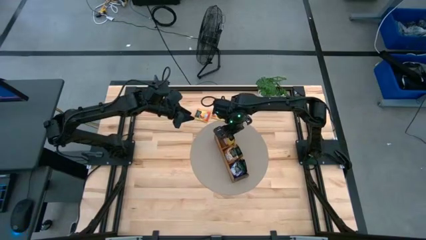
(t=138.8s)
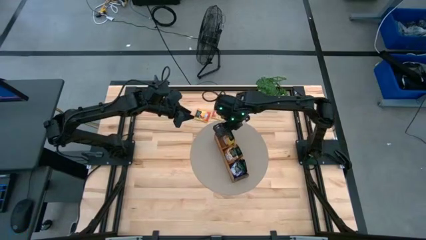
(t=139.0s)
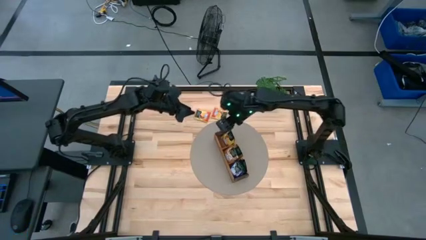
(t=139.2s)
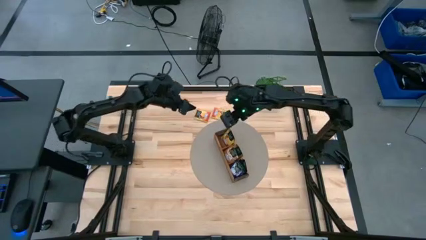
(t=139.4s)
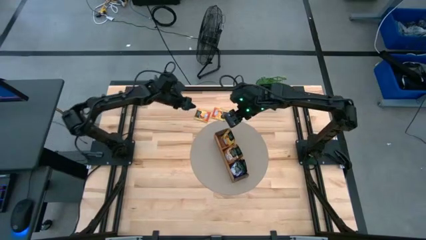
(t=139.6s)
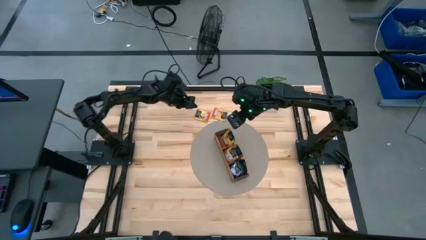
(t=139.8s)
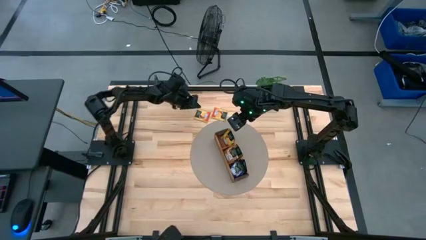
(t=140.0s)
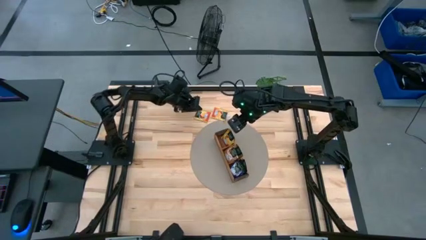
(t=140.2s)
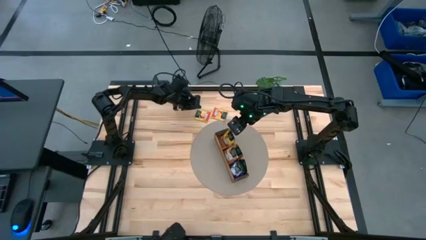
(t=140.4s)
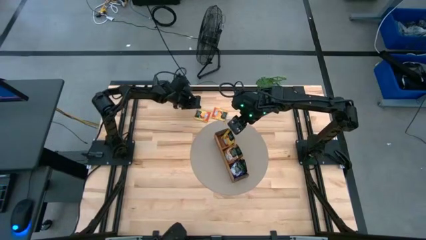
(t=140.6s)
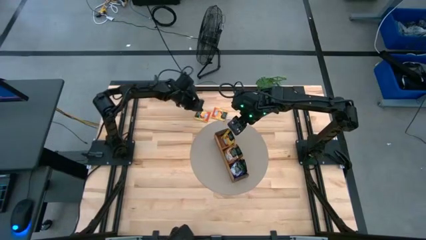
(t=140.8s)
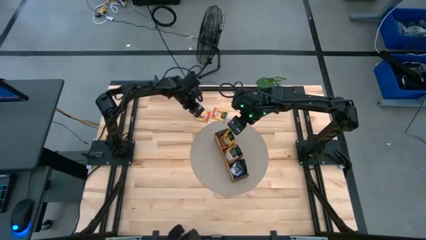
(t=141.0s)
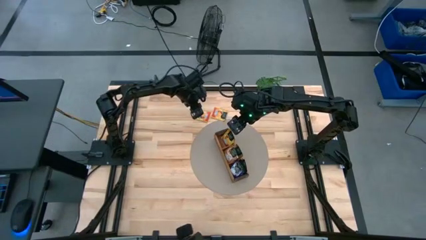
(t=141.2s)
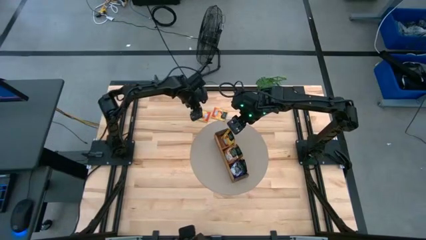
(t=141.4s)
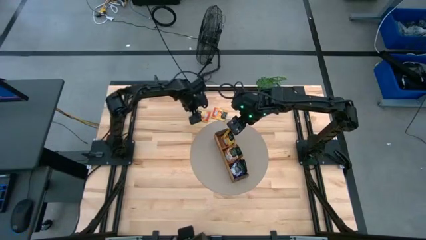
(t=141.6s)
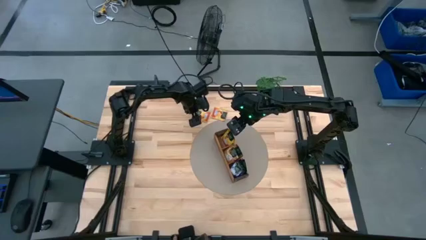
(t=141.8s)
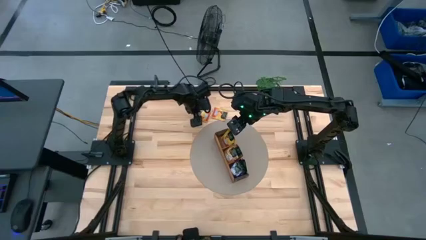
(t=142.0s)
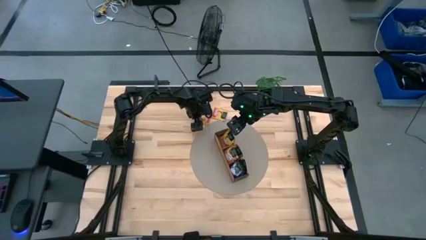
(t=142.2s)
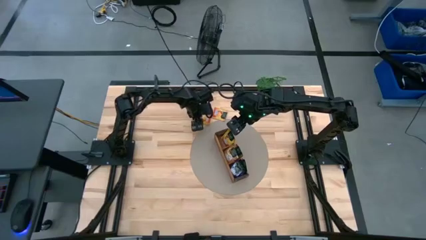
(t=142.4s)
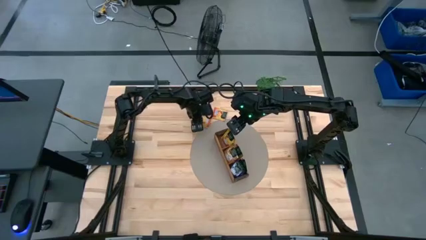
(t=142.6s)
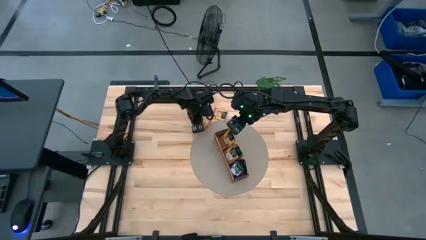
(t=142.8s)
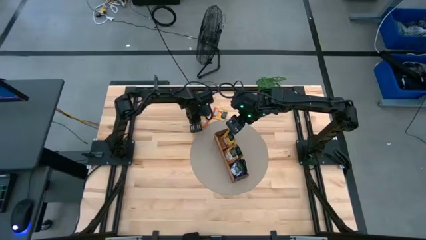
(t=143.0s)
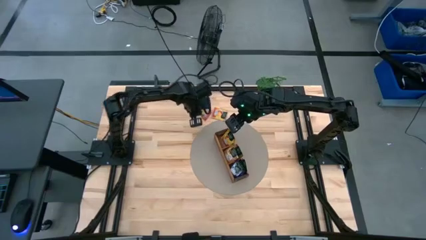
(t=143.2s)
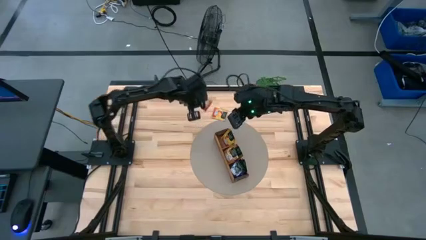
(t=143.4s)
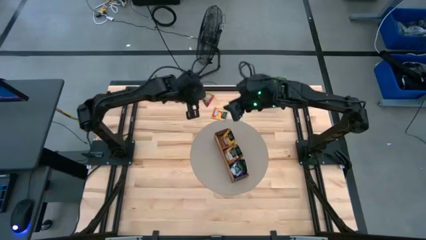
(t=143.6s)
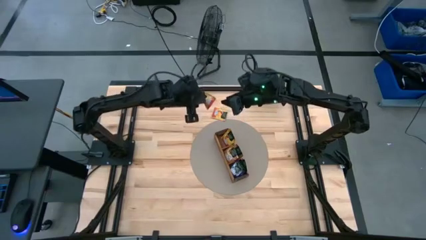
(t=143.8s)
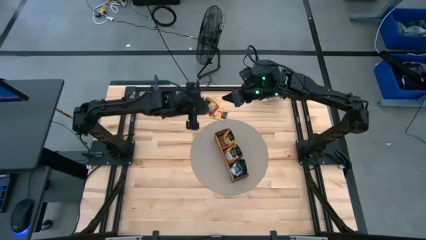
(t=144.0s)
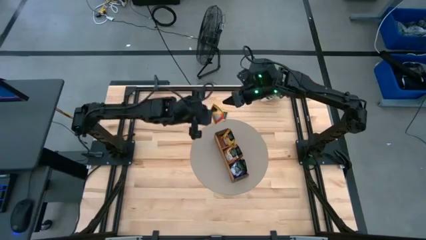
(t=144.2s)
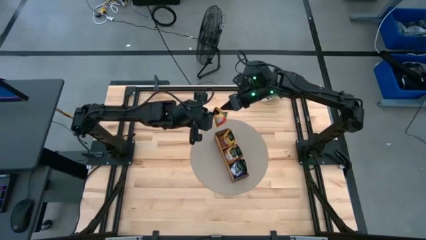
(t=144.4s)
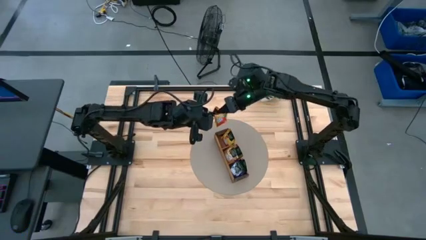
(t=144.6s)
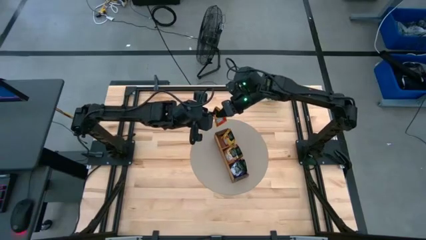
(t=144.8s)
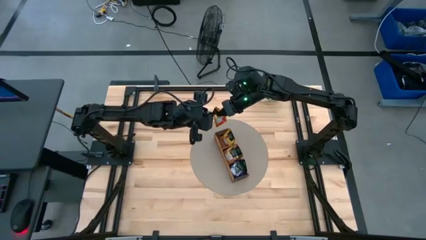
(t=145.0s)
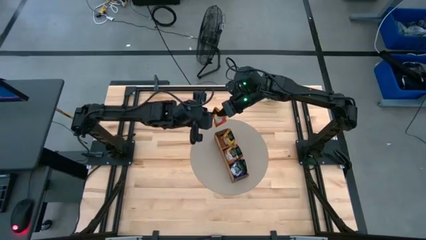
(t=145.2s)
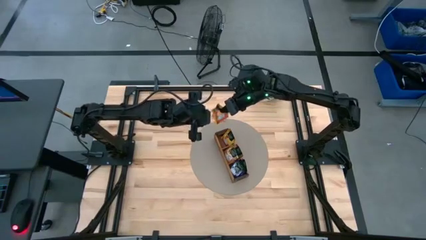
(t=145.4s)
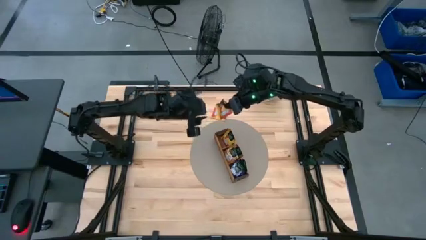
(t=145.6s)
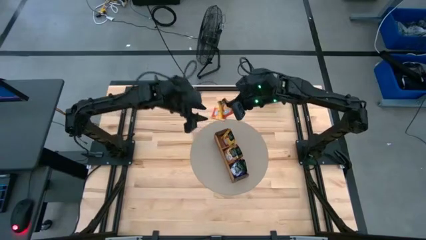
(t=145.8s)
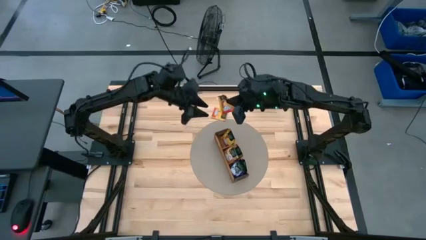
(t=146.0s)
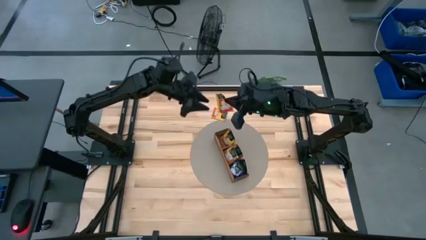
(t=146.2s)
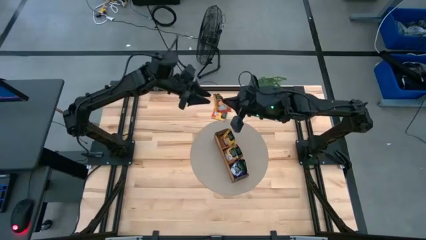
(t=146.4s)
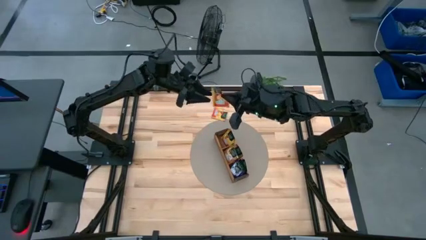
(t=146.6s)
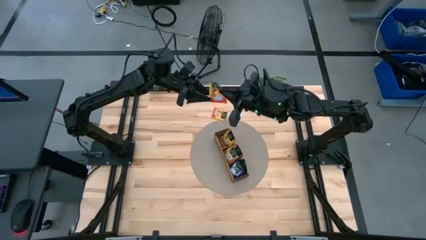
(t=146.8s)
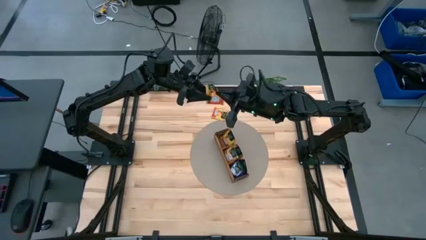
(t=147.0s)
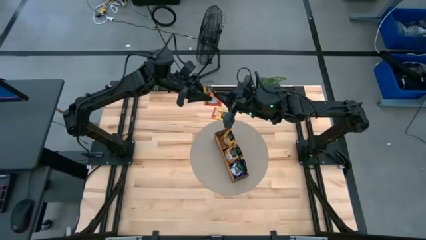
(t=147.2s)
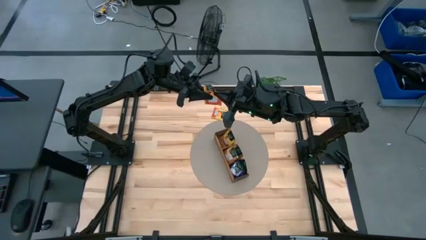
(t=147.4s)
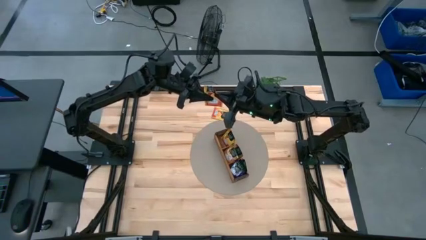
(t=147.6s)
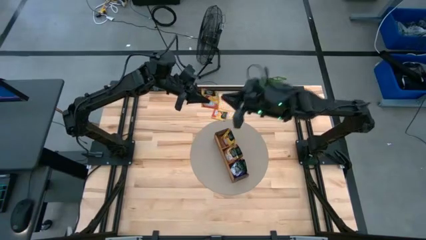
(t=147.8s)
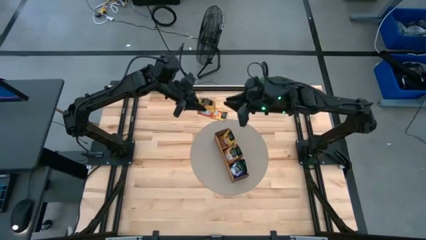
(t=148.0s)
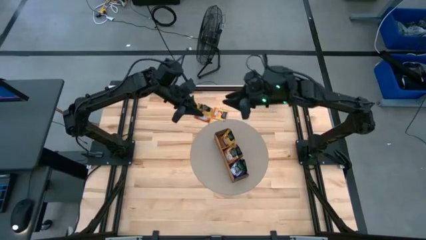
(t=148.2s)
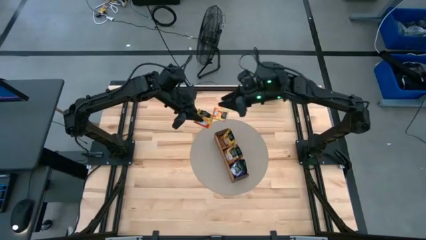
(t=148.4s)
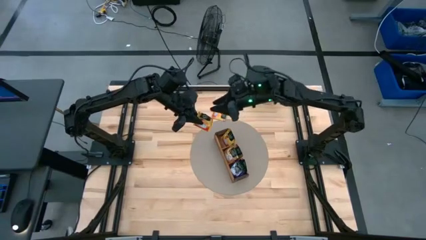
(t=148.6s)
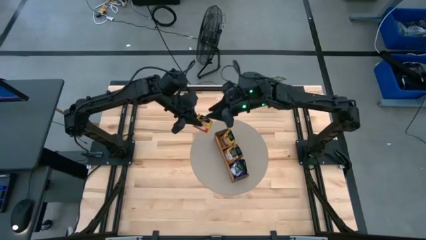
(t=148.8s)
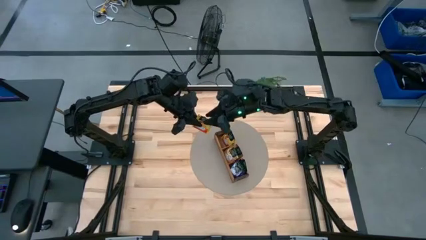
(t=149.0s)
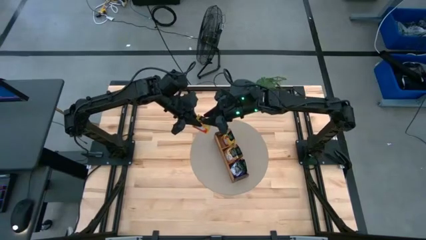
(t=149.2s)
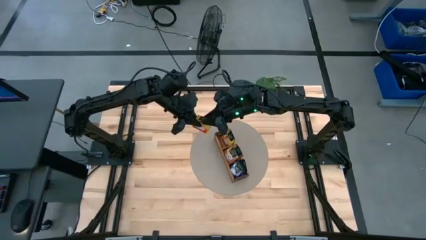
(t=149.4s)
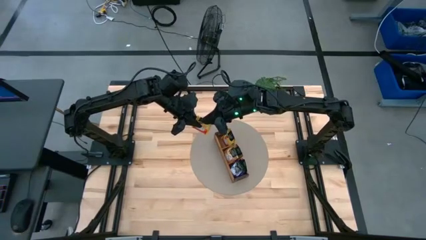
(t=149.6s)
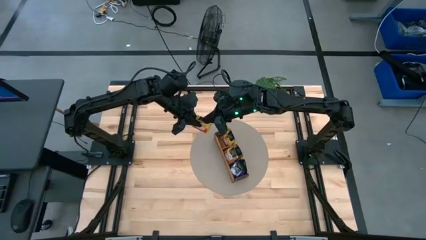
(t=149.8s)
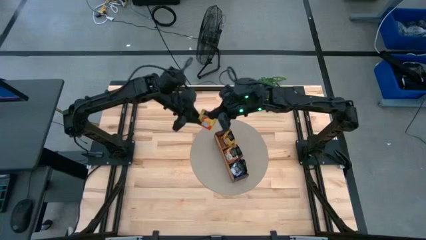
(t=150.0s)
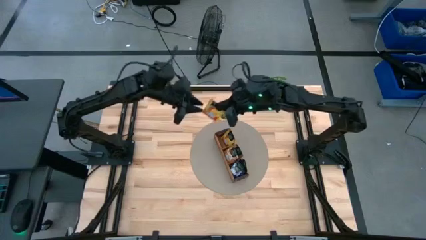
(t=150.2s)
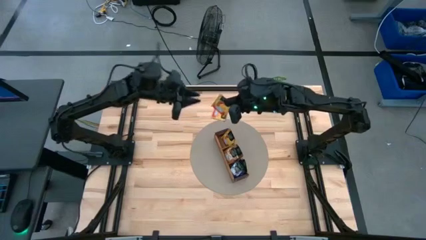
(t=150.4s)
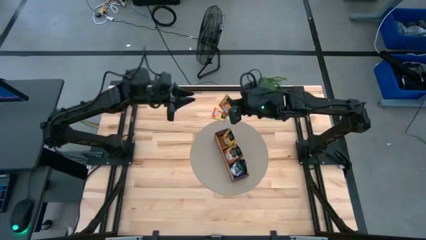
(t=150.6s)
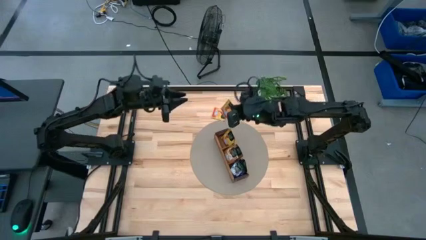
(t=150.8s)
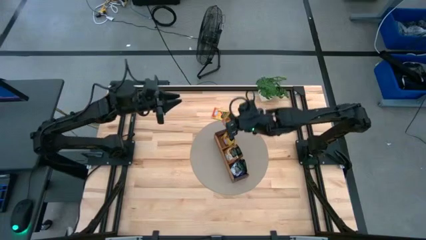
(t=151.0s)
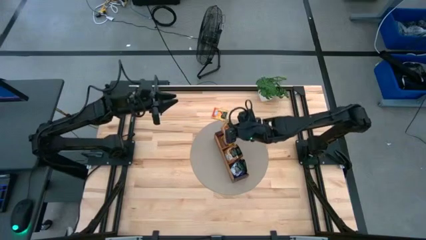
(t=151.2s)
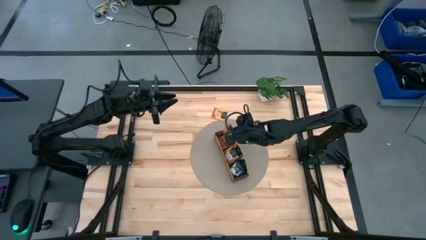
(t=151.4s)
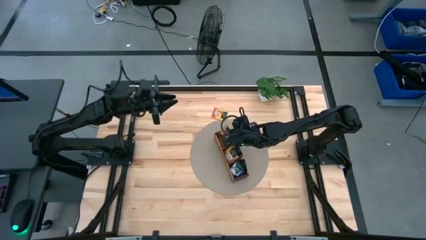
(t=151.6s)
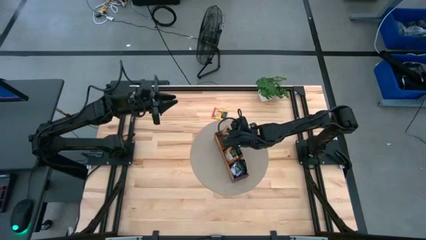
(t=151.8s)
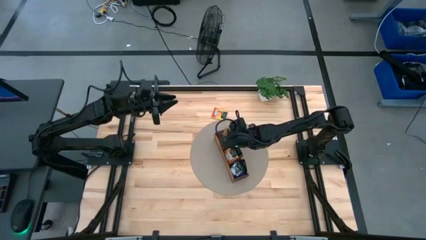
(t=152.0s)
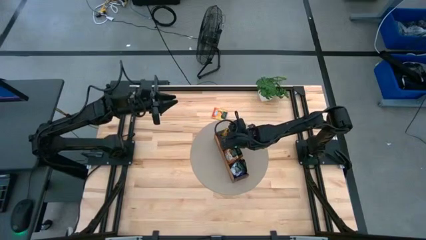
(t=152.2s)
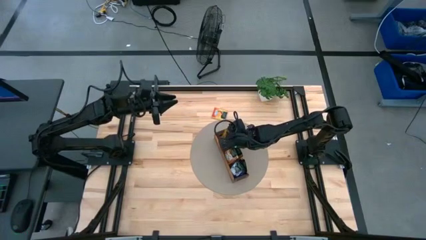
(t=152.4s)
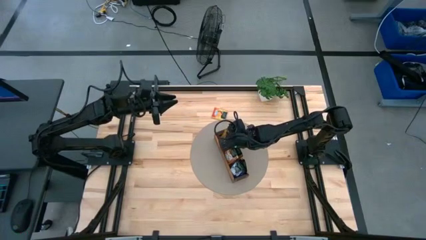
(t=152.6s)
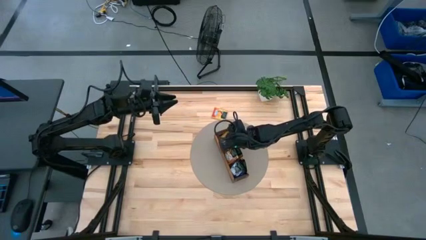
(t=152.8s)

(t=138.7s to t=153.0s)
Task: Pick & Place Tea
Put the orange tea bag into the left section of the wooden organizer

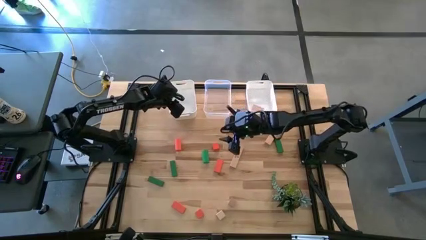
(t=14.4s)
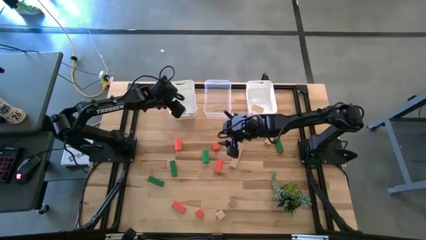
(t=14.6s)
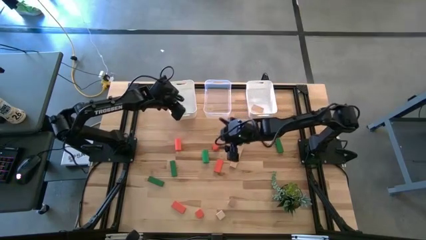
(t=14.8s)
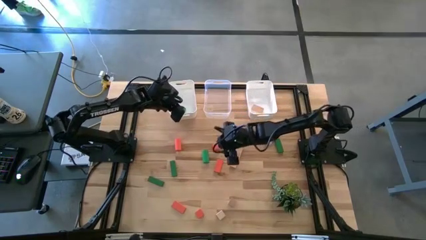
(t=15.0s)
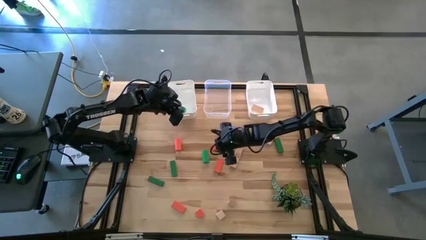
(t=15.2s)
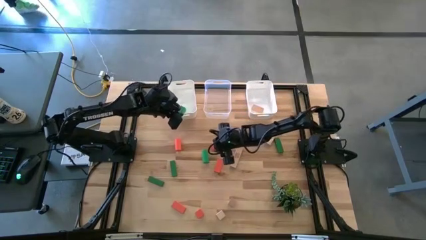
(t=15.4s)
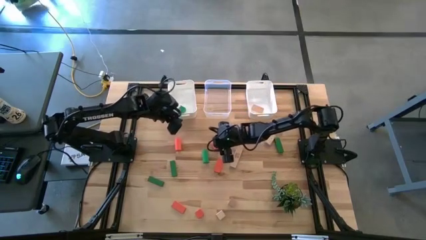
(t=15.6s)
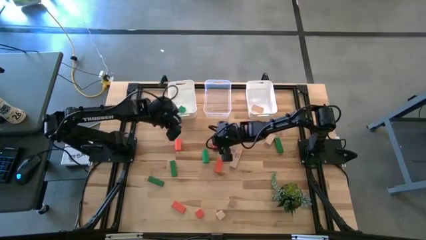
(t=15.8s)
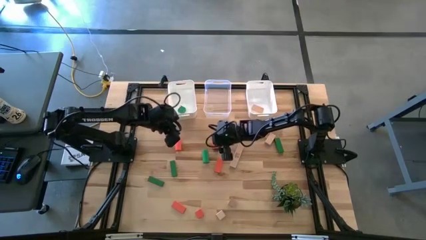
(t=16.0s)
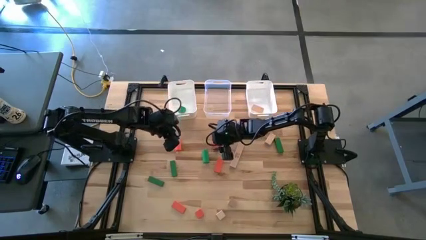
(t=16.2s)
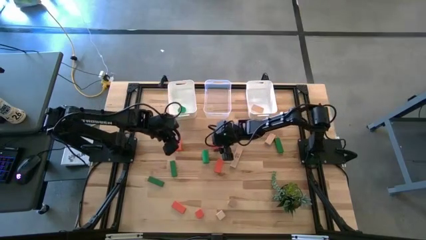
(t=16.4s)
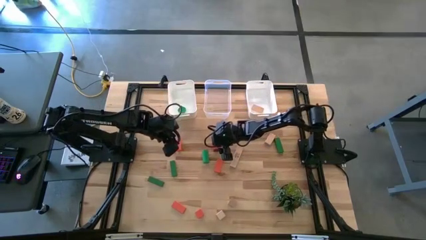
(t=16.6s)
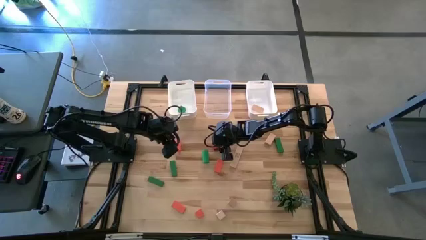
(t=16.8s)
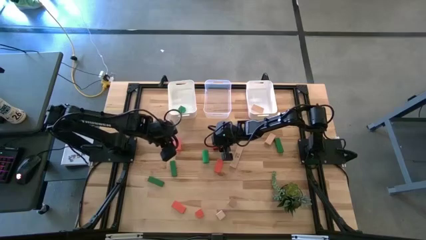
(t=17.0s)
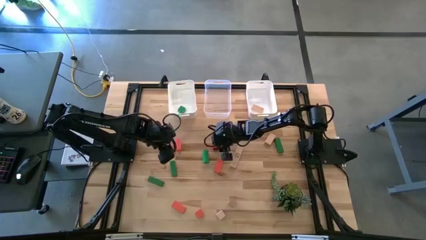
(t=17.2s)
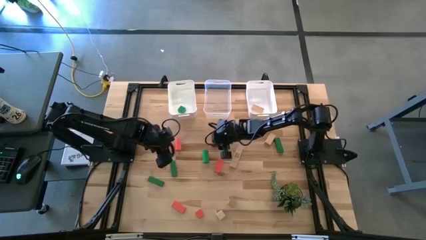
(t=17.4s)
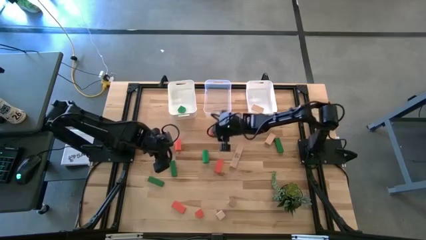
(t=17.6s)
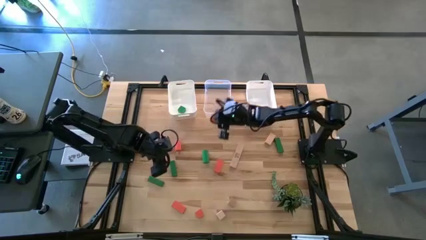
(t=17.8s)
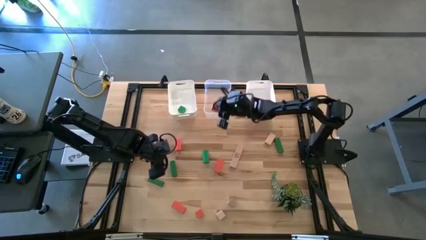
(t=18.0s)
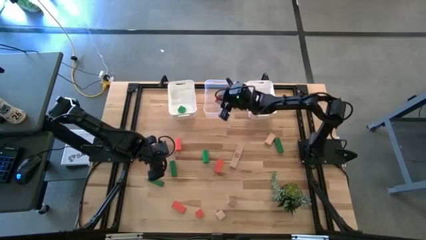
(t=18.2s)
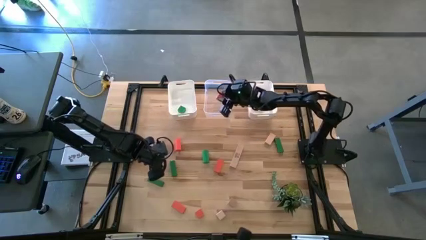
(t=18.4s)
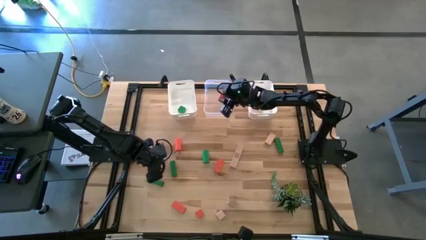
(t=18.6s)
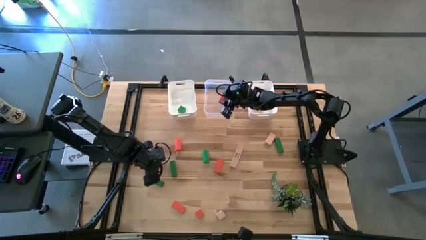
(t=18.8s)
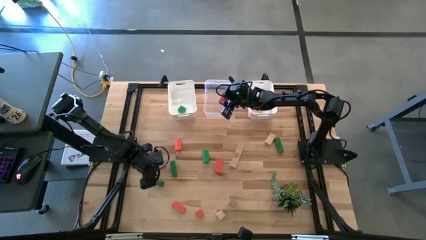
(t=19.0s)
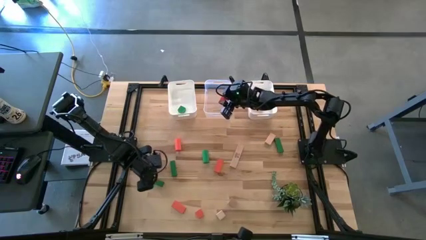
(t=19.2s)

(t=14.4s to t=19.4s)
Task: Sort & place blocks by color
Put the orange block into the transparent bin
